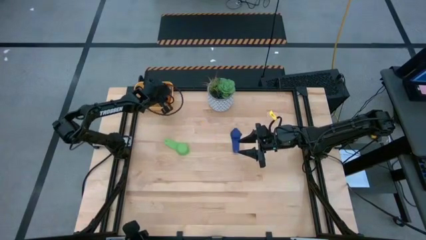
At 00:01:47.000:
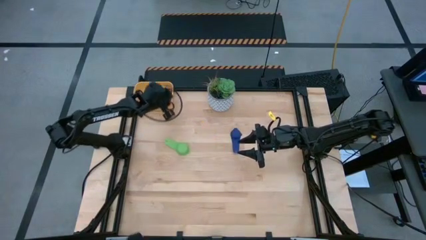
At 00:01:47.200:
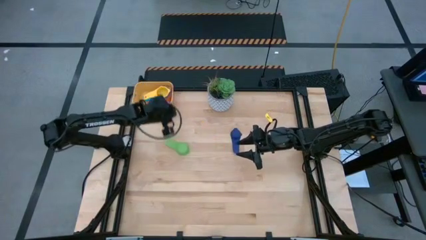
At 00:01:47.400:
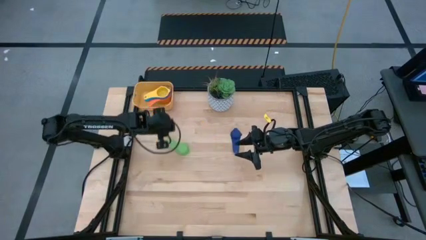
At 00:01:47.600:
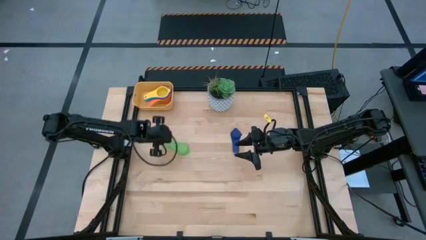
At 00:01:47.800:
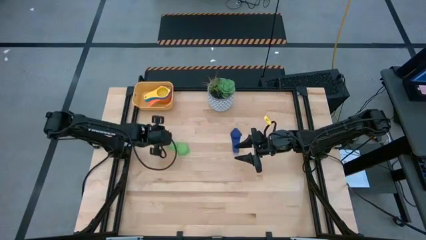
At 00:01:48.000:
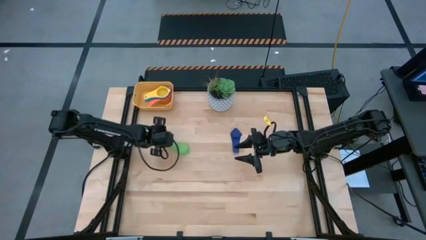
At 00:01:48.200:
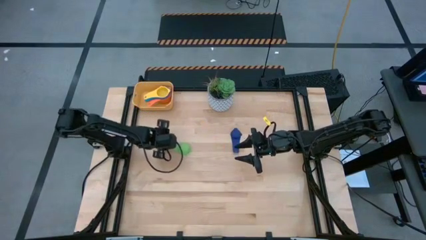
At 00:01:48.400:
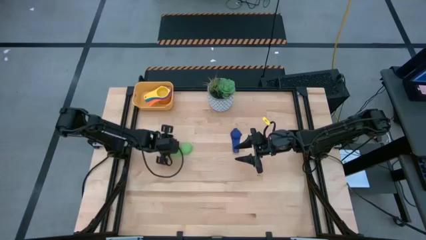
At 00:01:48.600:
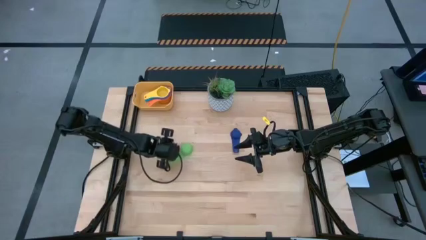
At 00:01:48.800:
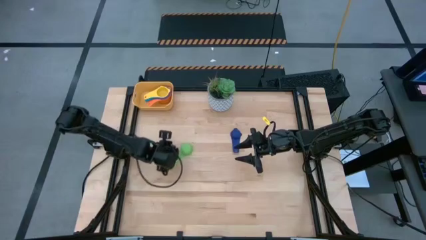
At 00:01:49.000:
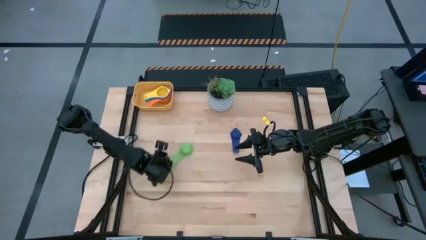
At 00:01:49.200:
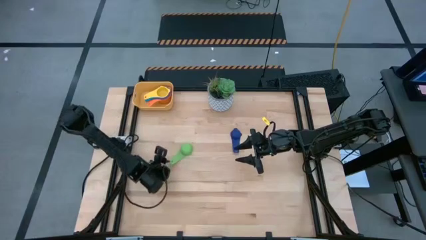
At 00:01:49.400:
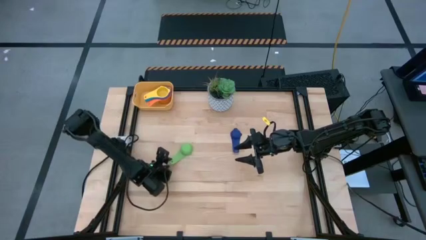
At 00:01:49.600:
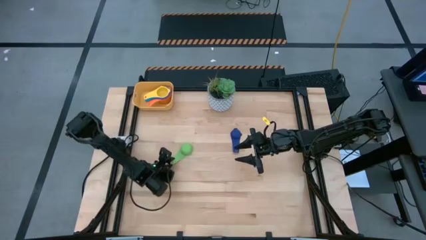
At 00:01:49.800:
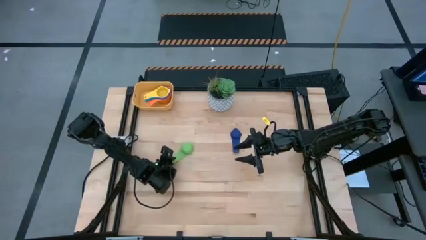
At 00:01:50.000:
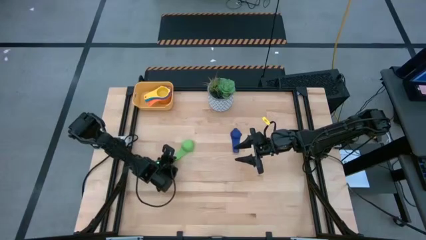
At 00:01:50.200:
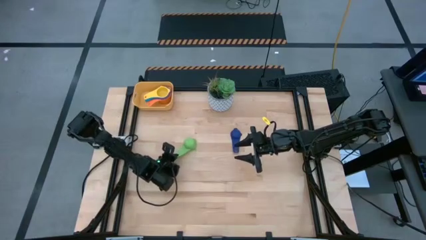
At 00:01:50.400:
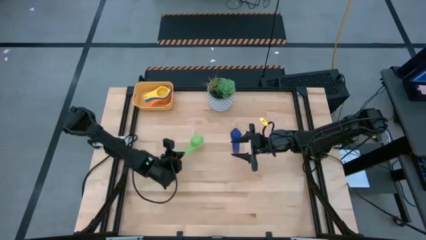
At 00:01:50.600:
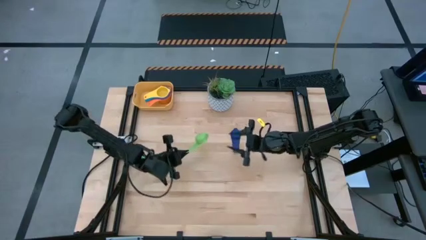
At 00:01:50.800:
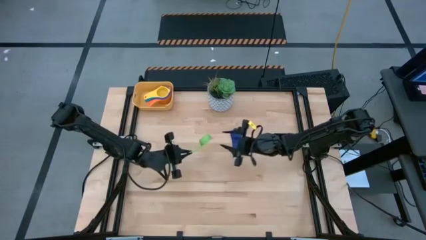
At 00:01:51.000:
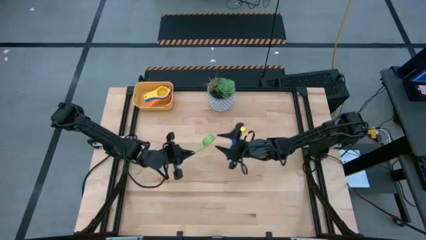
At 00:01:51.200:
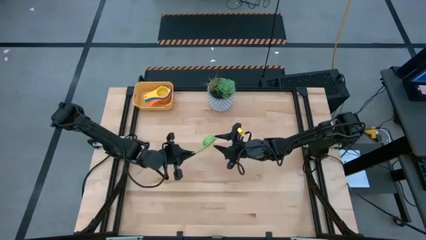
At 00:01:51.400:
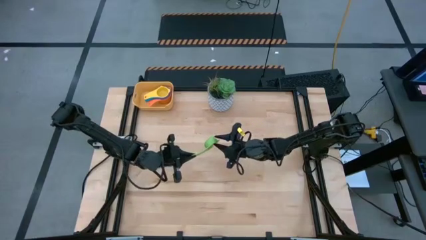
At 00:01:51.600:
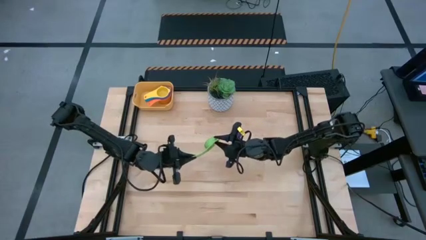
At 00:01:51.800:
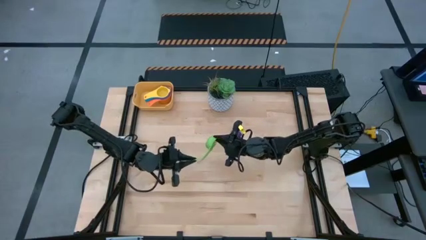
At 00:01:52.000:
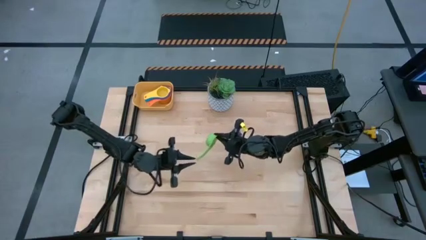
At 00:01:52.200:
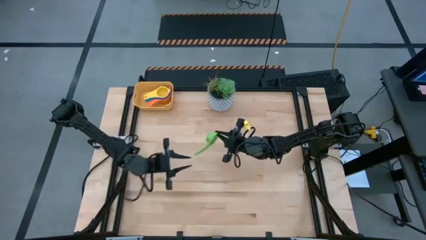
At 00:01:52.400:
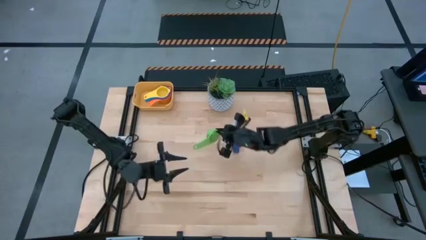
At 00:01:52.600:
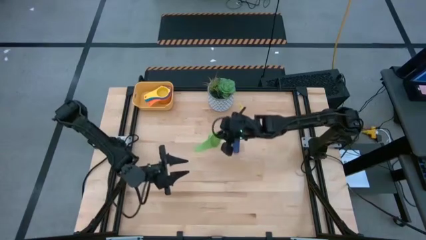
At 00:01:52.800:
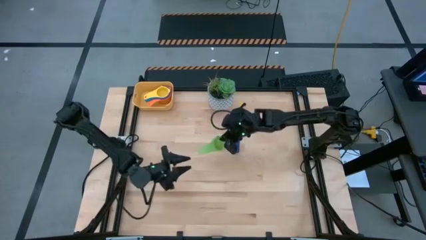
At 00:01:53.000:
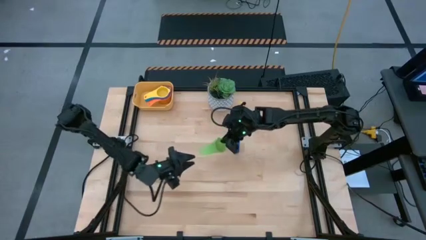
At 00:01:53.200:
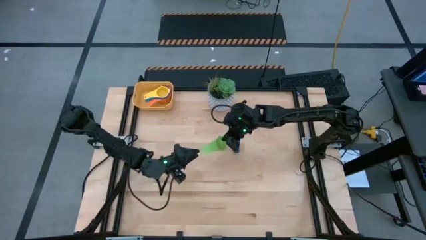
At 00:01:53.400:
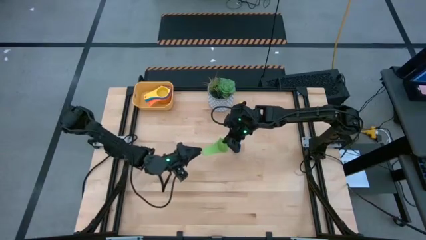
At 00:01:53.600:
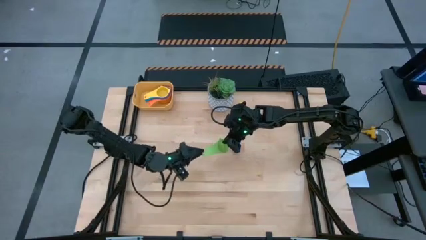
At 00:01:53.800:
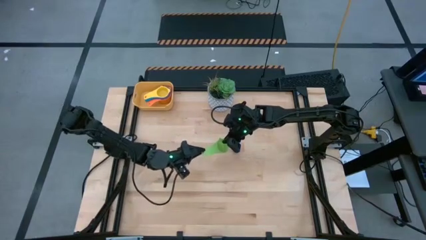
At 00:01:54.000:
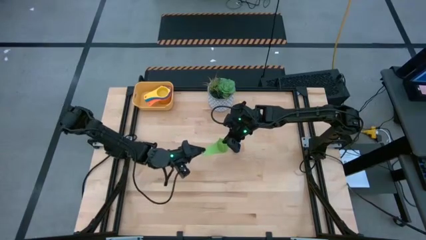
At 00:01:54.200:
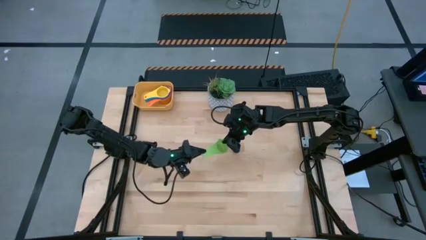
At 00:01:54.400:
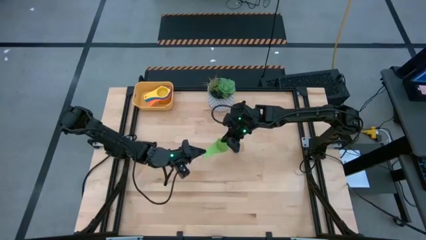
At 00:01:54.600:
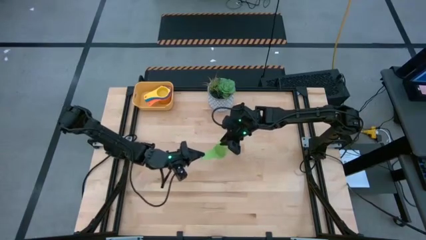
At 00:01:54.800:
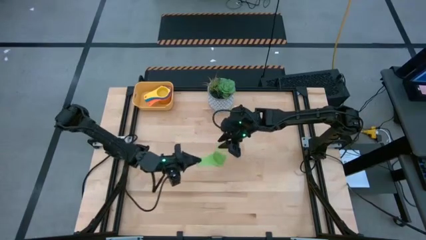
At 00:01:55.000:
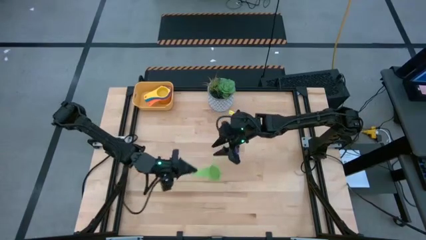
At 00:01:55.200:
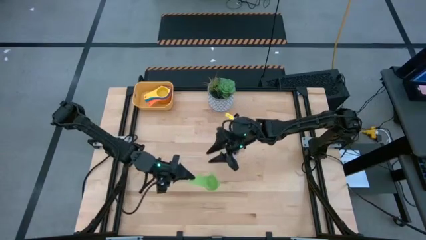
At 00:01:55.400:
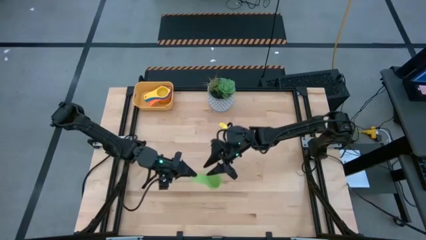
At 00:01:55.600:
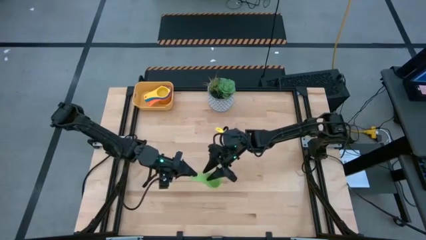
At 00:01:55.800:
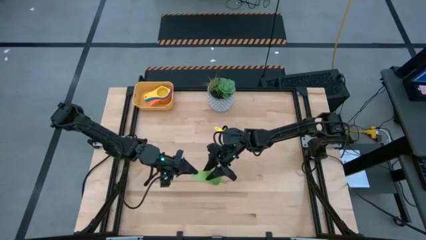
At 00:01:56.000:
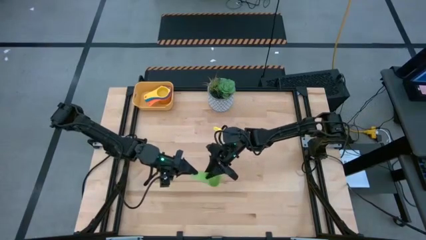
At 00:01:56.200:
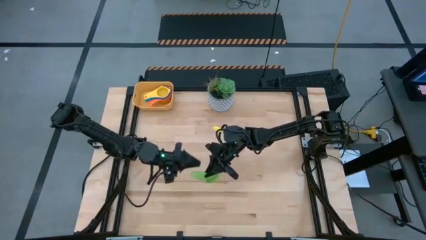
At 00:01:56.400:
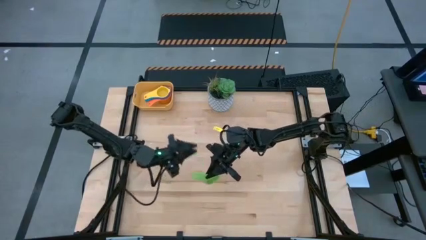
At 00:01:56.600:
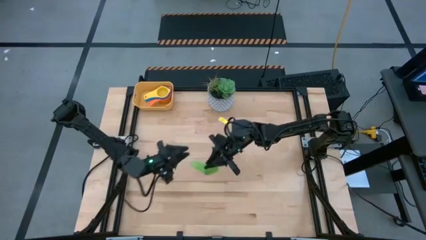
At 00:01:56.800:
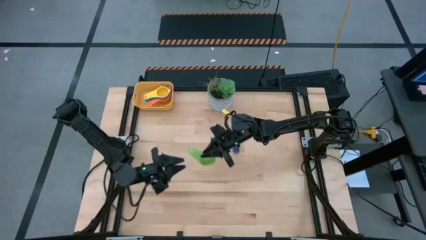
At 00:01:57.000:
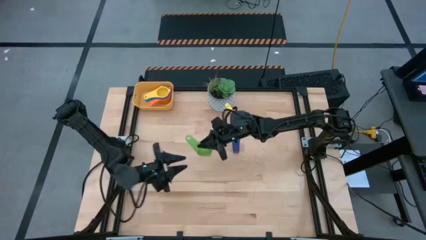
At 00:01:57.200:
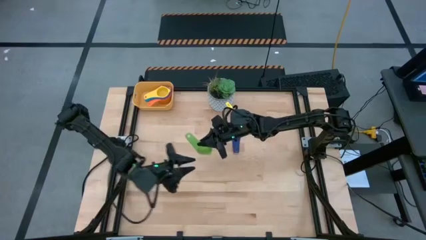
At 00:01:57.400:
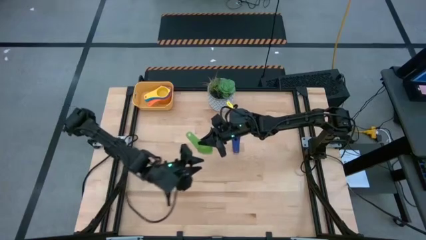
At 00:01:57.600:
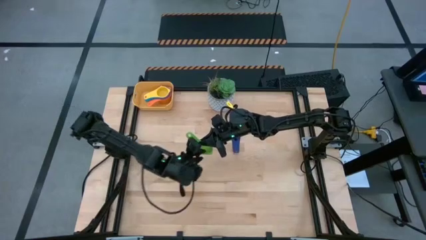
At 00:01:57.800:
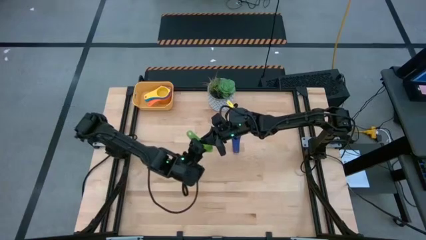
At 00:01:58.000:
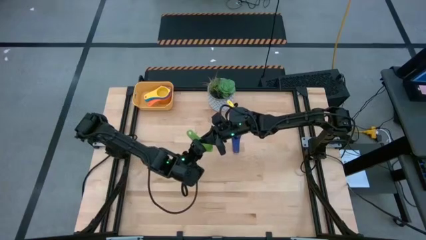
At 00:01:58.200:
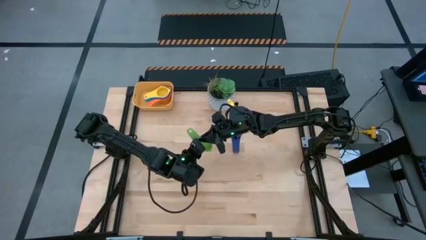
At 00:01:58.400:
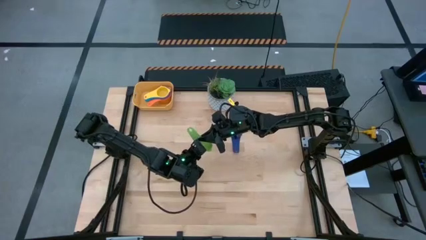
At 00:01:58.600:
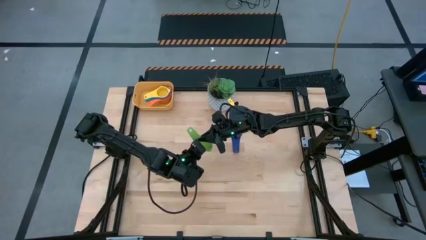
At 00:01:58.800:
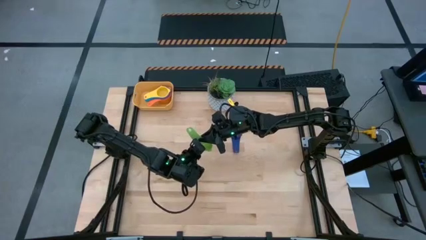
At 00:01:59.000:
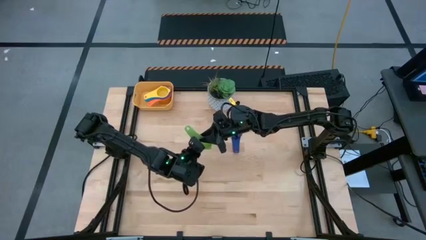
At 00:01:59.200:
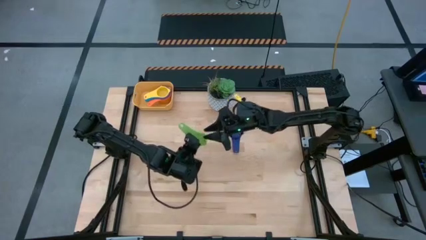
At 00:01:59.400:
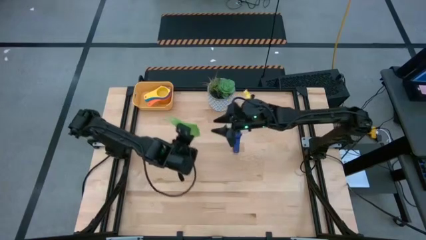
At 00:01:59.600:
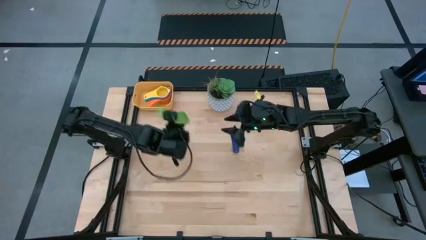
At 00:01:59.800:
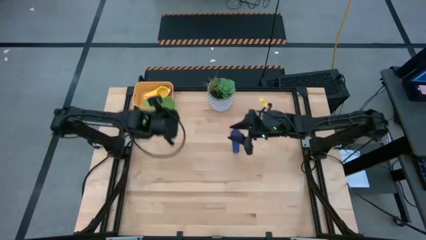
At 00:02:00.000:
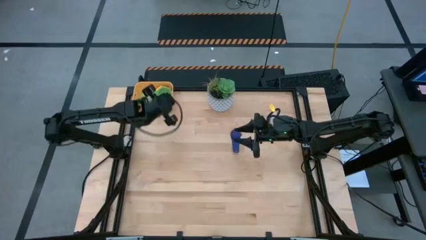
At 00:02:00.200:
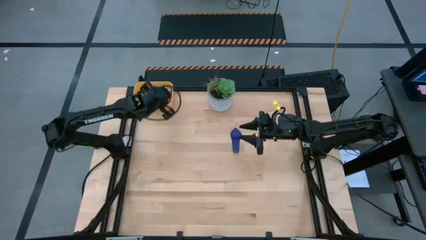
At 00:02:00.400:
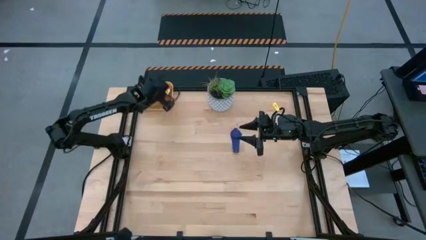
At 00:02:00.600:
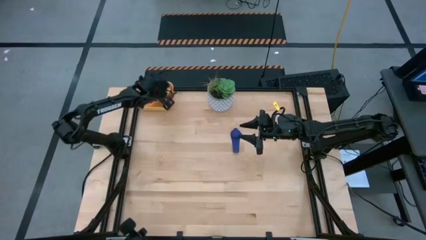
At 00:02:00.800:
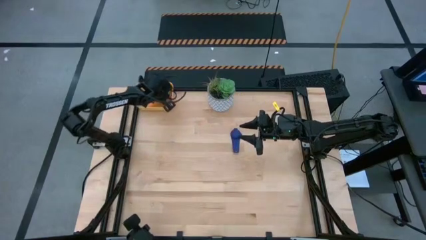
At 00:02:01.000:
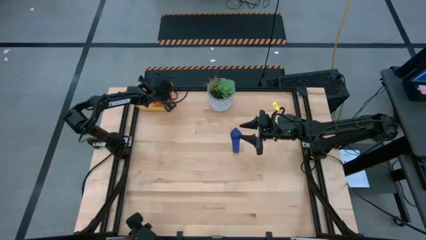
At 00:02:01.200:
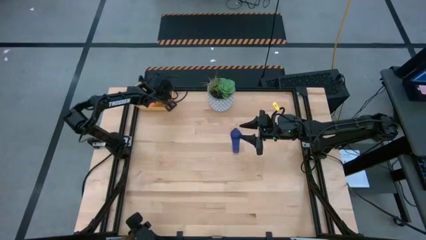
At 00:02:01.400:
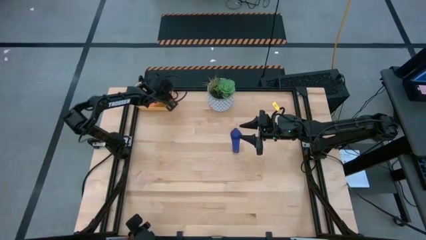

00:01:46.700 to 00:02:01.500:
Task: Nest measuring cups in basket
Stack the green measuring cup on top of the yellow measuring cup in the yellow bin
